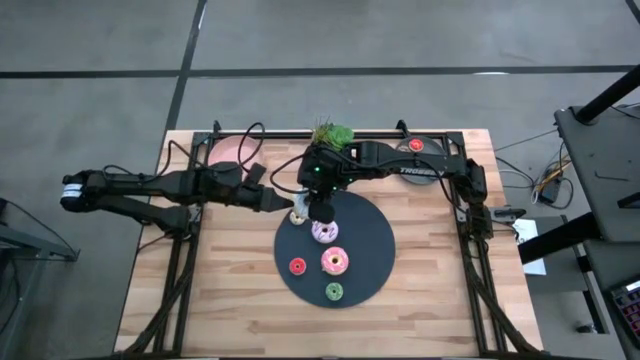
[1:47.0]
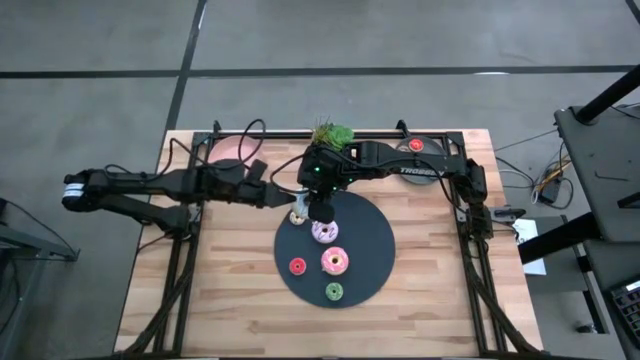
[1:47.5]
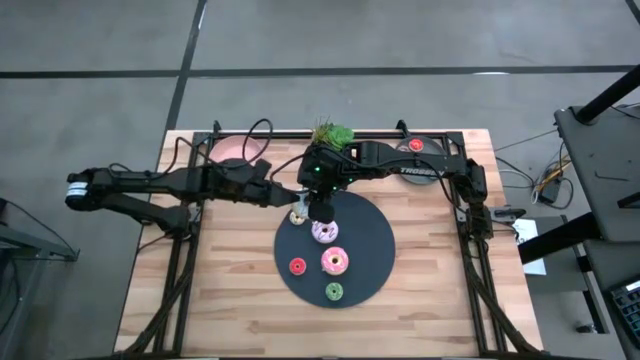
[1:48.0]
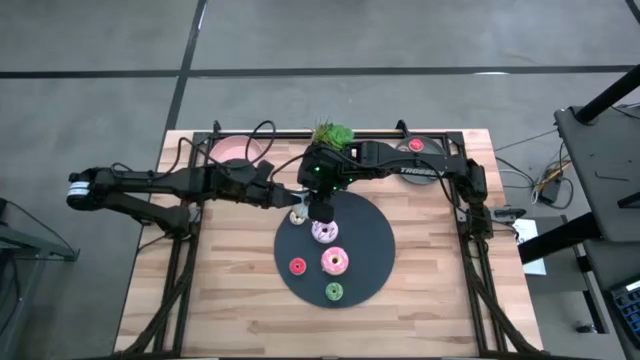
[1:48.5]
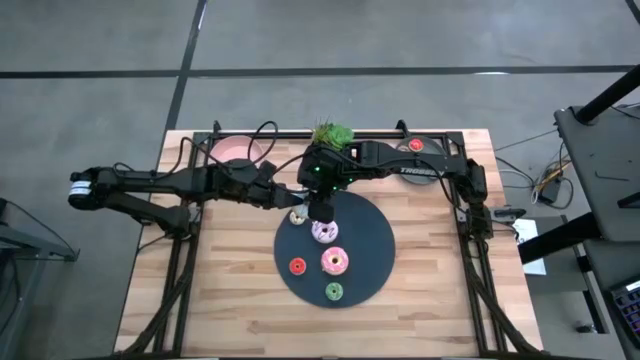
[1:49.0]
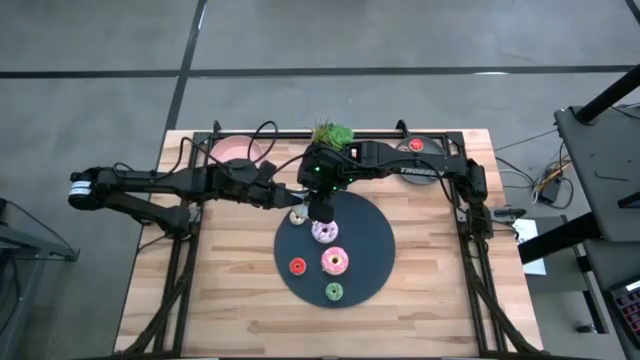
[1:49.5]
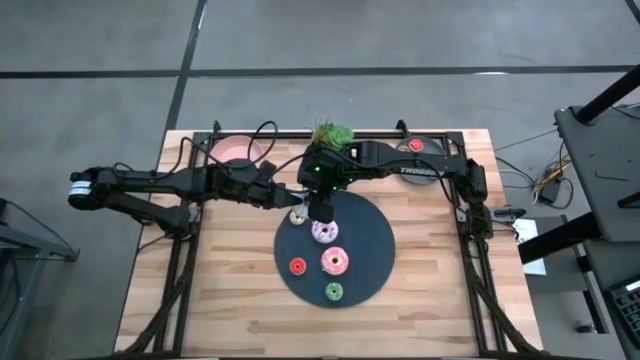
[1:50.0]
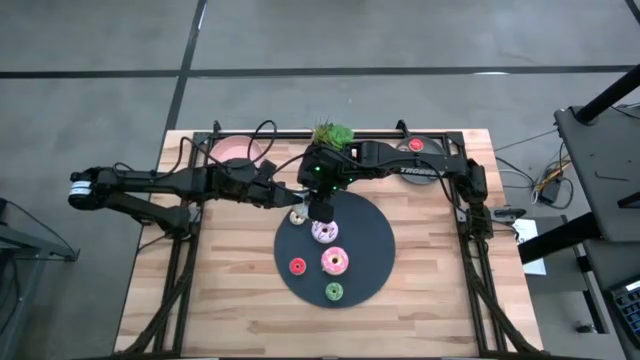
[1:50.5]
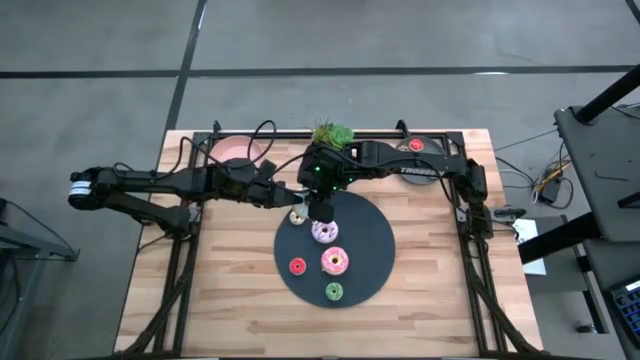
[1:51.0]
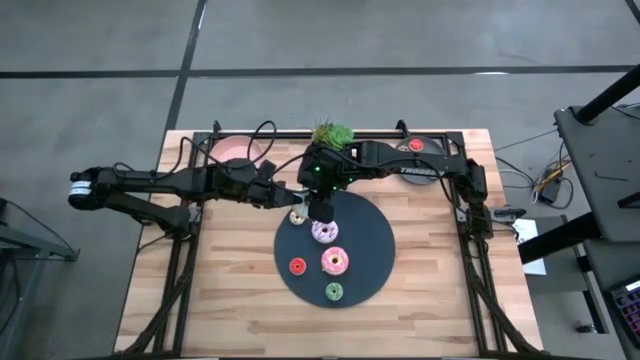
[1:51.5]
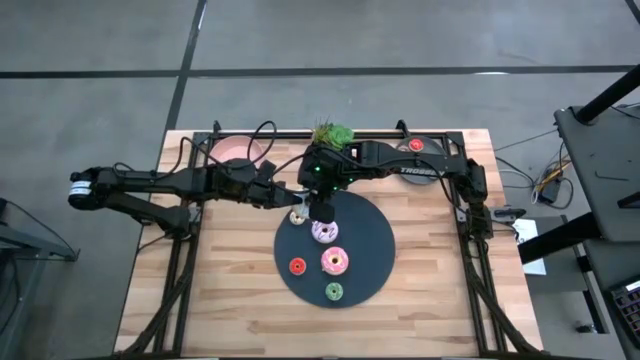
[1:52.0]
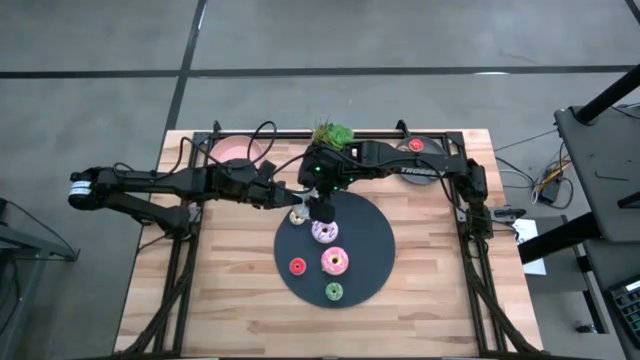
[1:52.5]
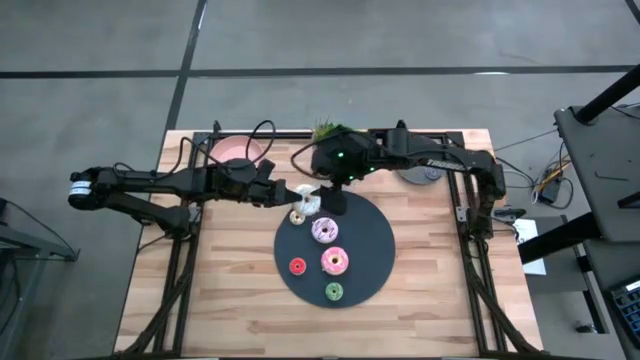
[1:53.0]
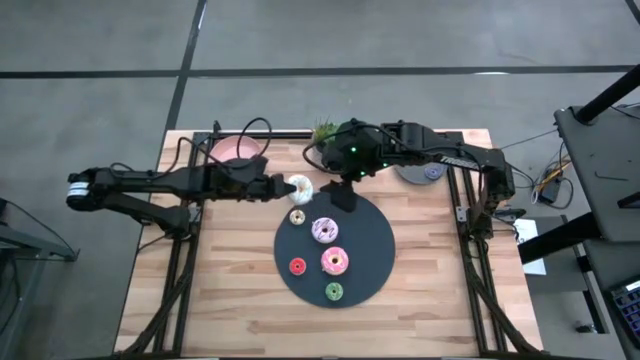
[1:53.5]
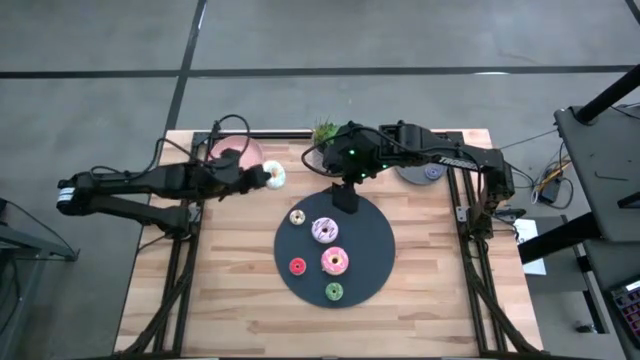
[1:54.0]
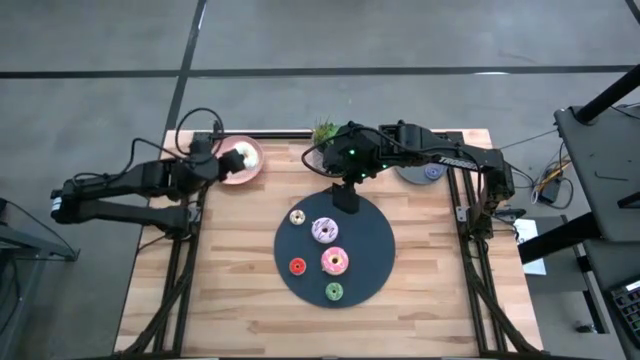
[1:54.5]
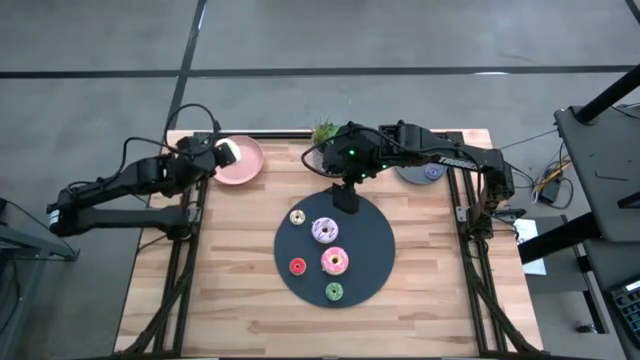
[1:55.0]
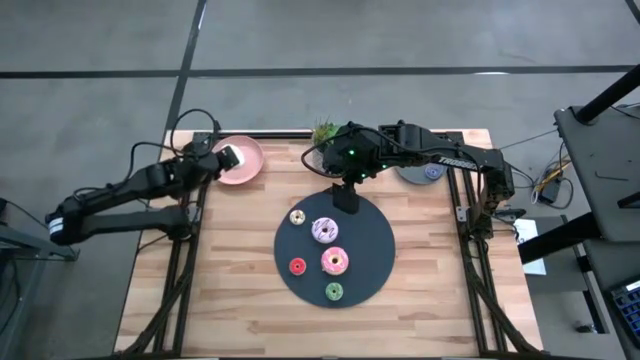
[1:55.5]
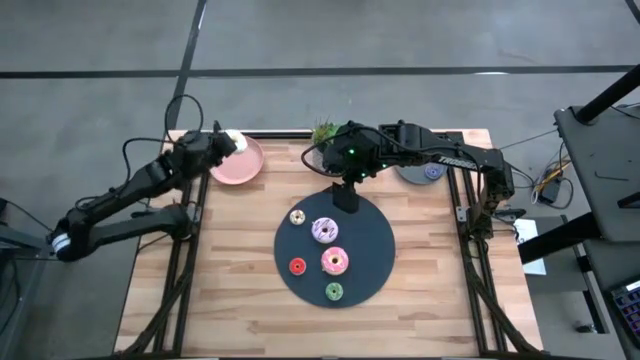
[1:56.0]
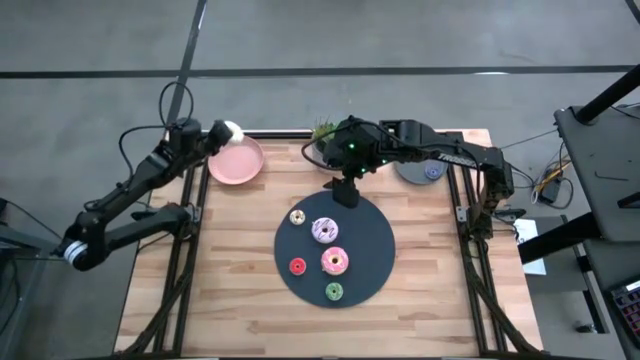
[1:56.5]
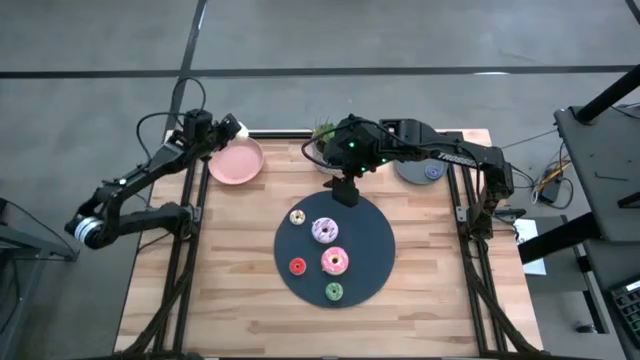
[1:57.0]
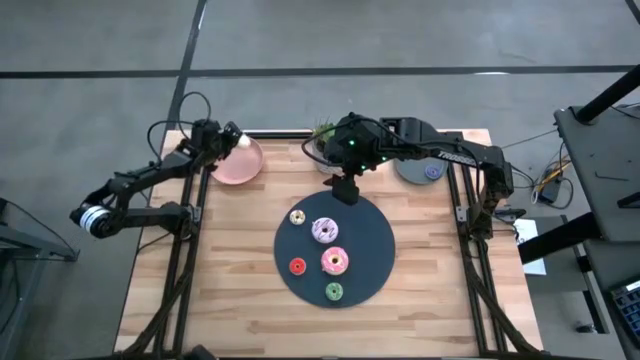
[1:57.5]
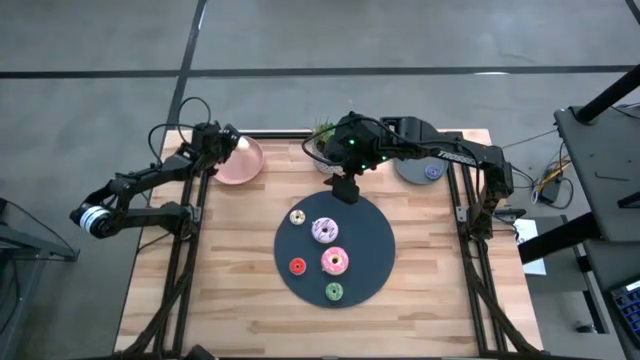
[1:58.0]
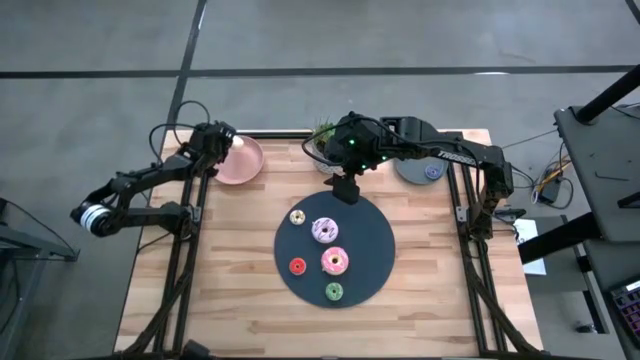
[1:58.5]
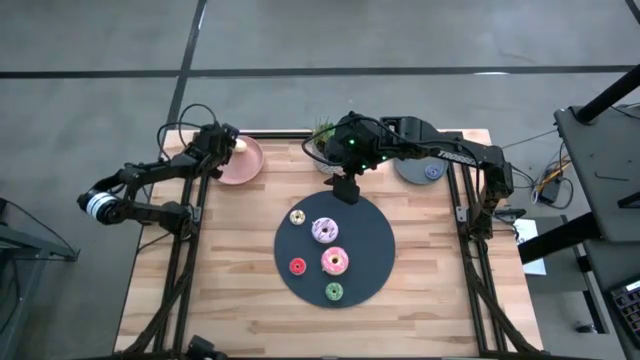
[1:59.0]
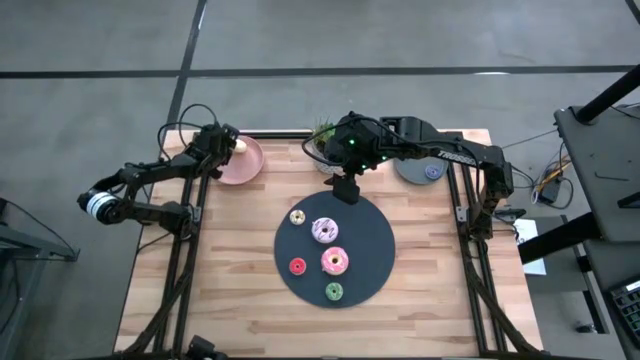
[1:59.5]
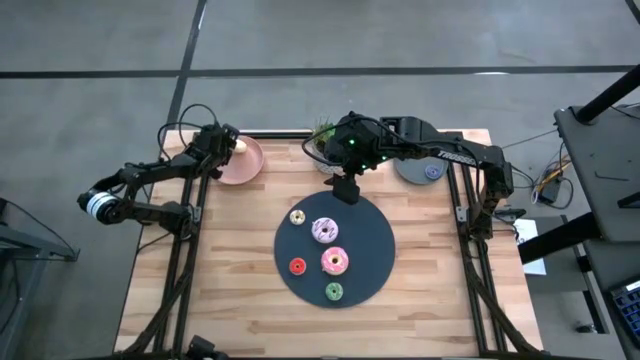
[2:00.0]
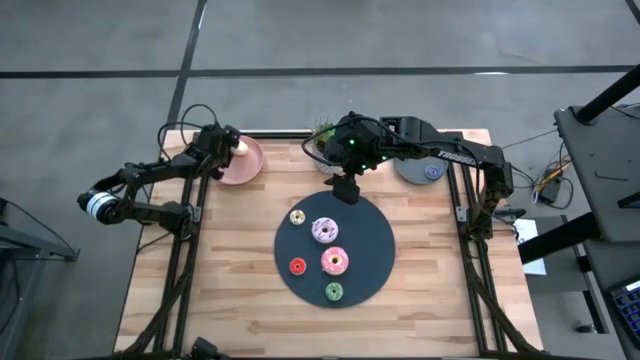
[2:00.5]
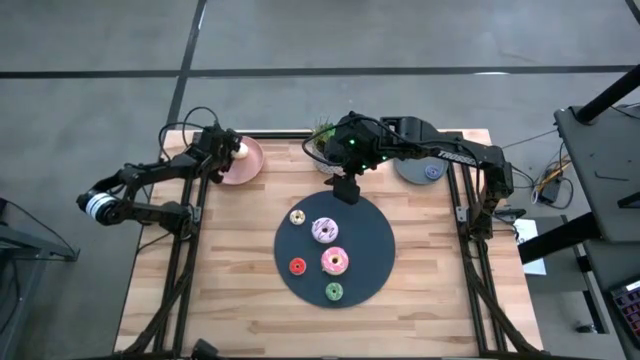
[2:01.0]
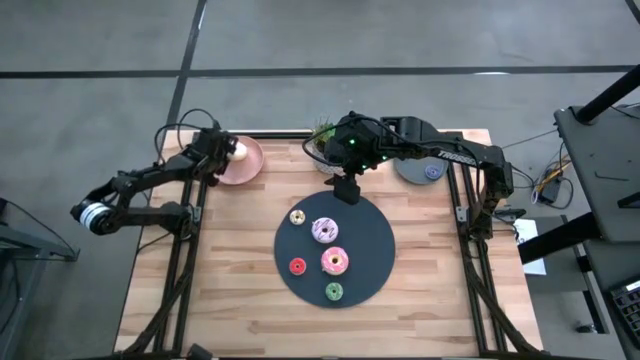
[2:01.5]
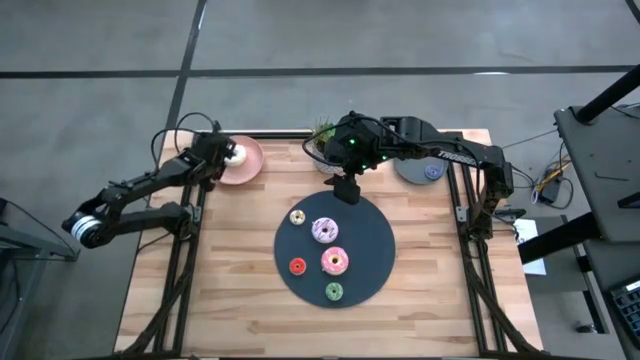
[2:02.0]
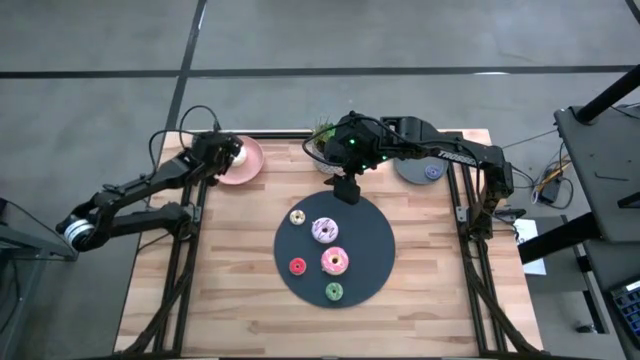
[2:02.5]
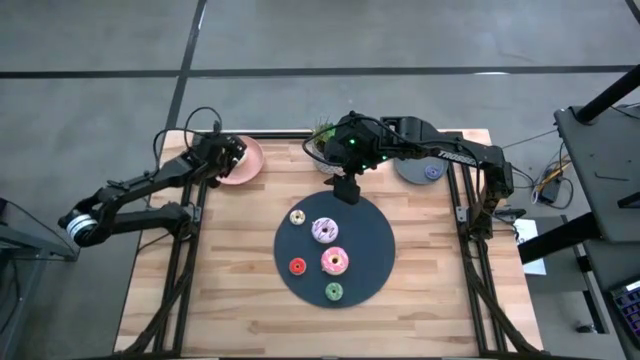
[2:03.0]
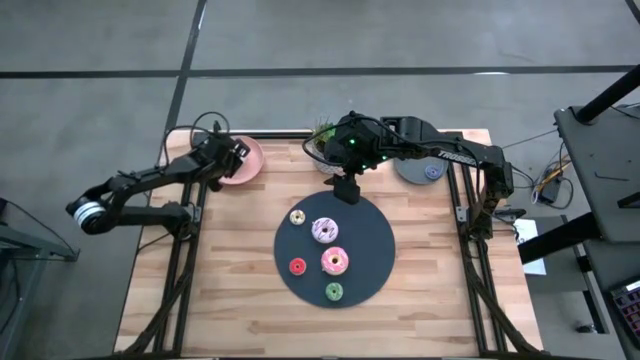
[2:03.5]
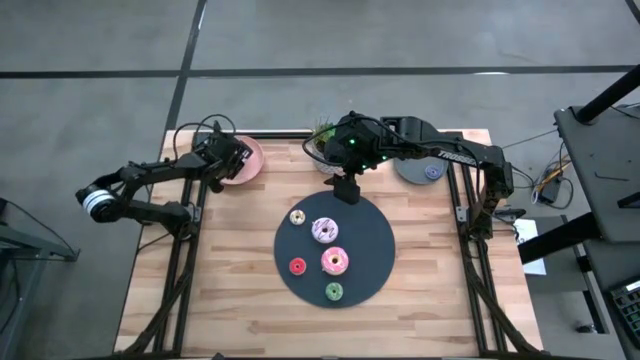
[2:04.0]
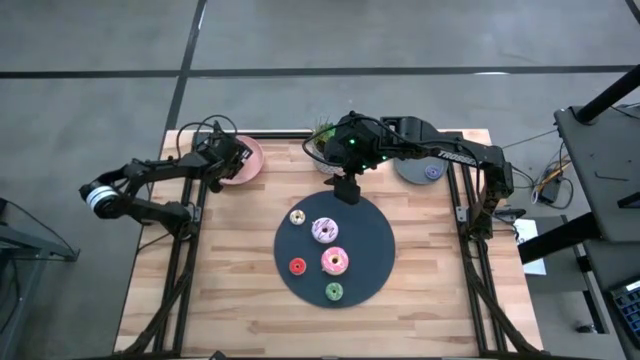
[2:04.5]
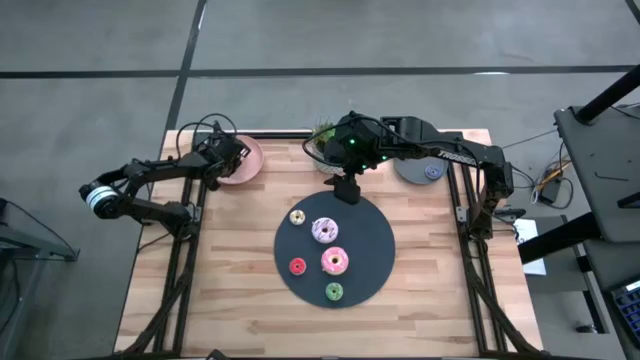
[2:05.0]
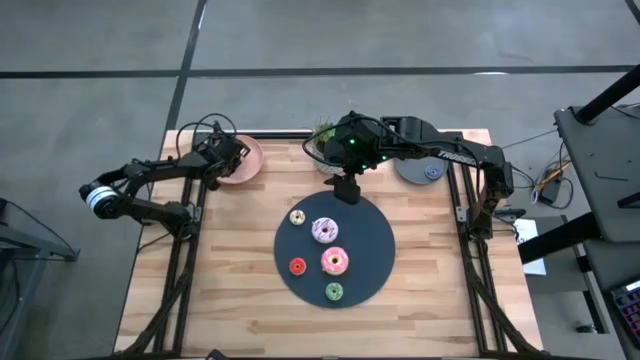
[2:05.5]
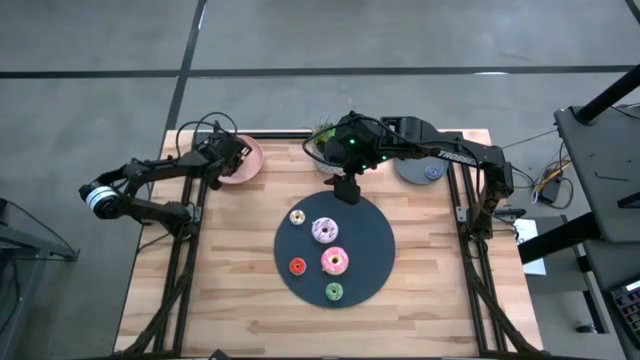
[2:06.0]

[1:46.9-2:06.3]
Task: Pick & Place donuts
Put the large white donut on the pink plate

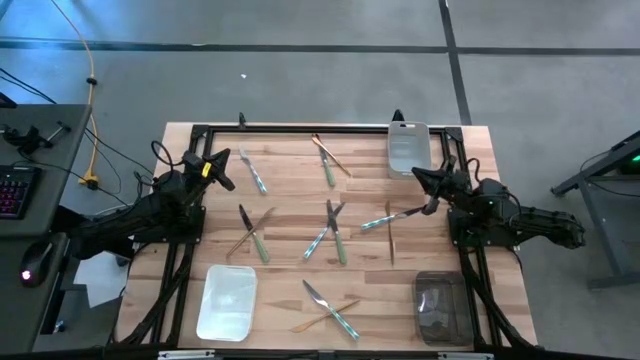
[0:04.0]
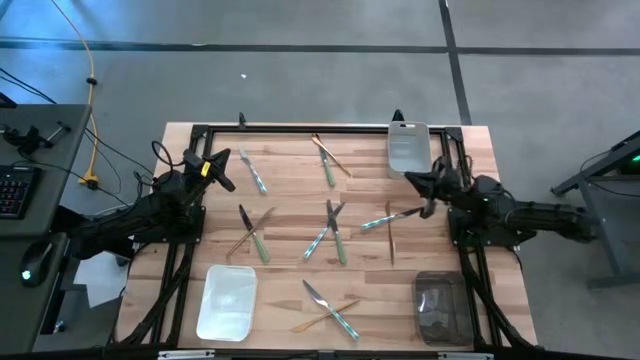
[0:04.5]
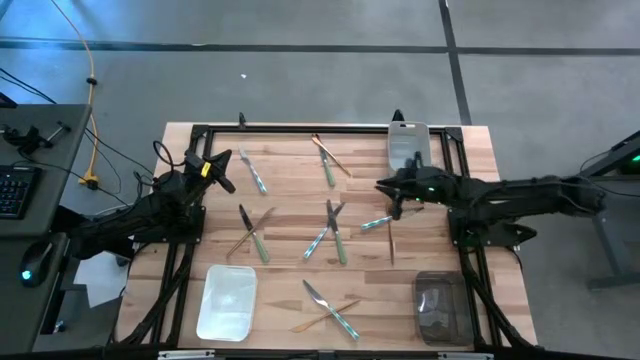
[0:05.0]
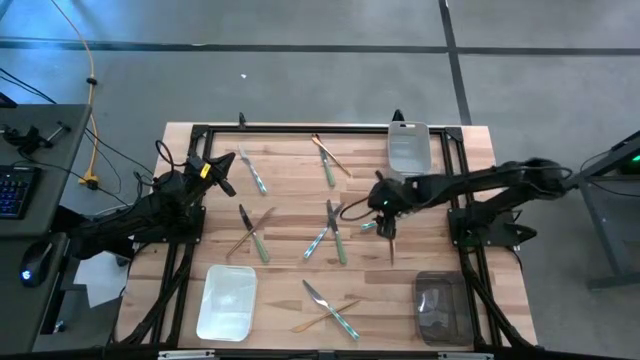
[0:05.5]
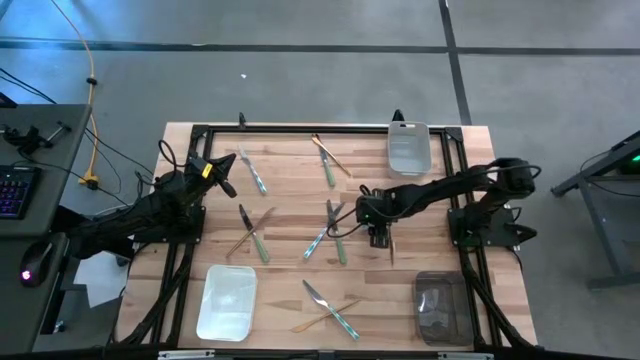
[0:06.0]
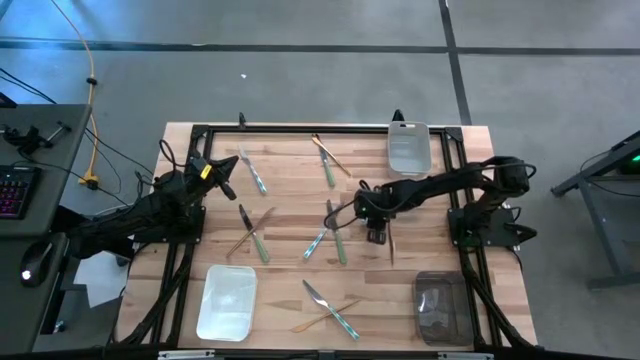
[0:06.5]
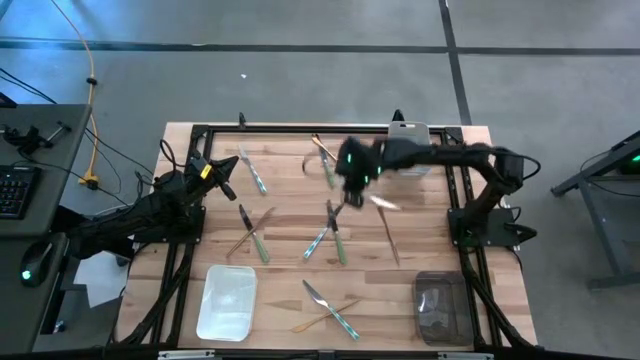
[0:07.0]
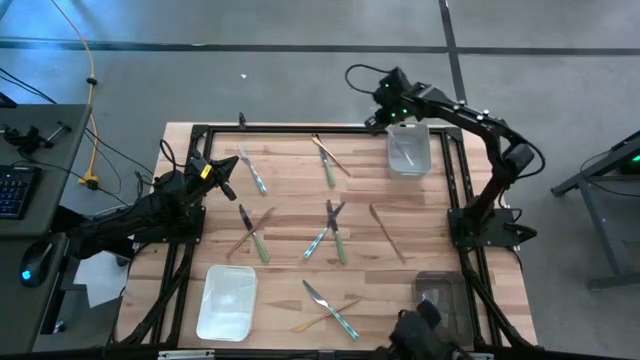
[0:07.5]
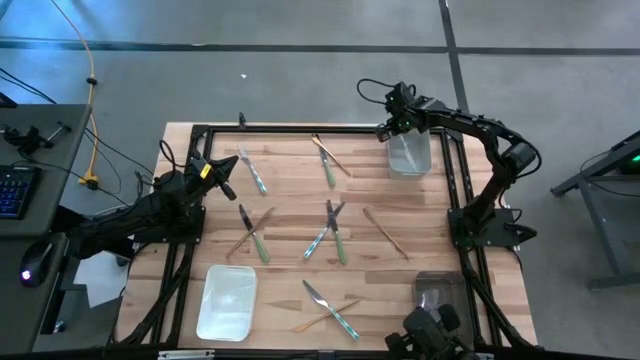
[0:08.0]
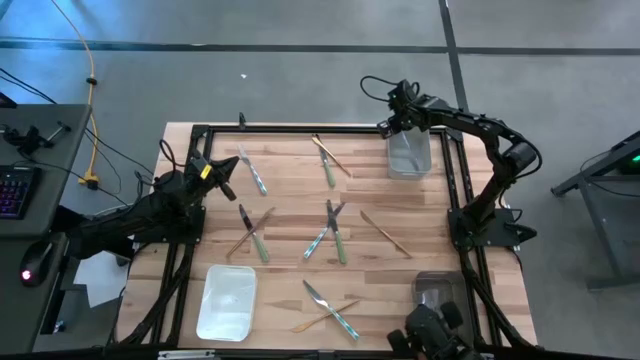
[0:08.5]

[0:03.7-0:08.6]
Task: Sort silverware by color (type)
Put the blue patterned table knife into the gray bin
